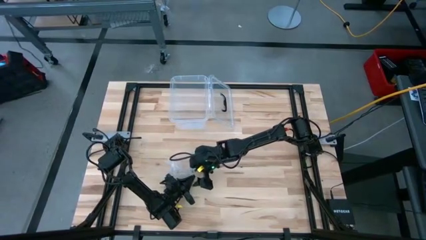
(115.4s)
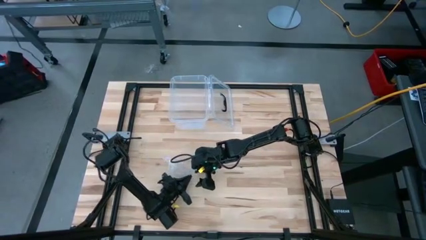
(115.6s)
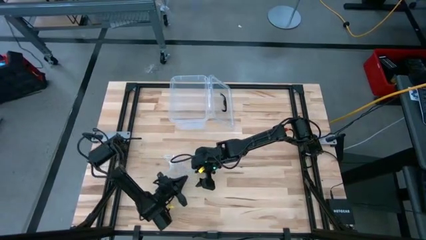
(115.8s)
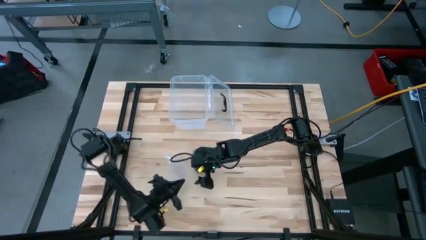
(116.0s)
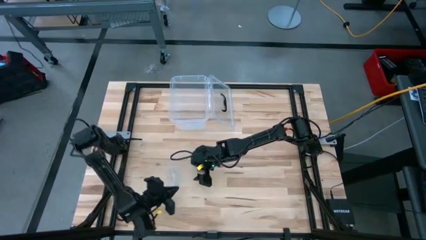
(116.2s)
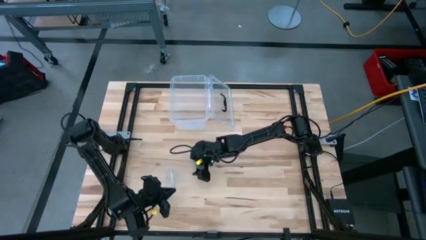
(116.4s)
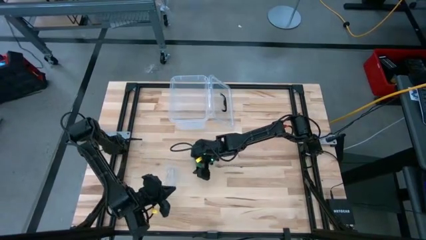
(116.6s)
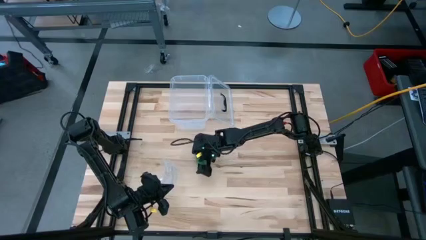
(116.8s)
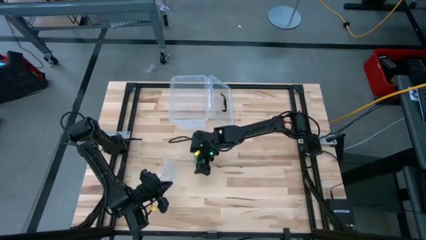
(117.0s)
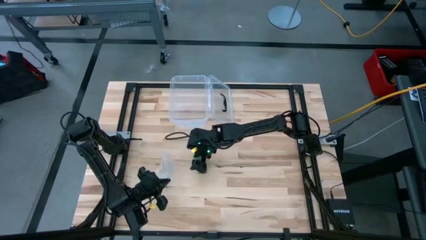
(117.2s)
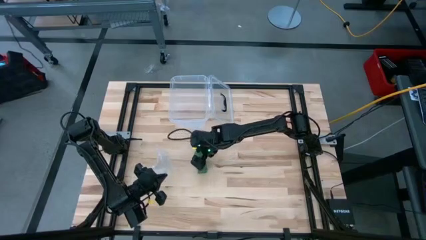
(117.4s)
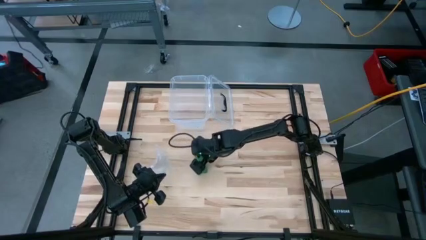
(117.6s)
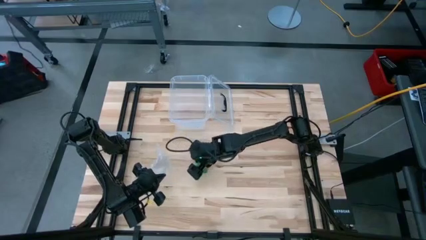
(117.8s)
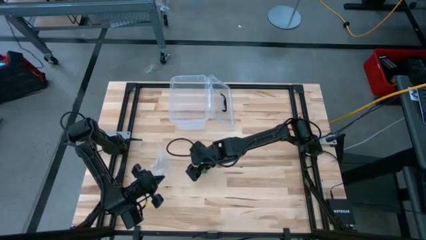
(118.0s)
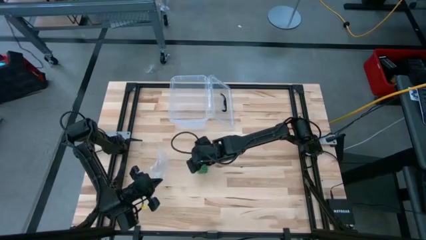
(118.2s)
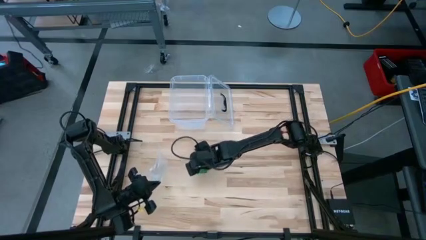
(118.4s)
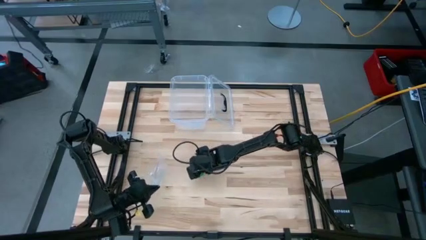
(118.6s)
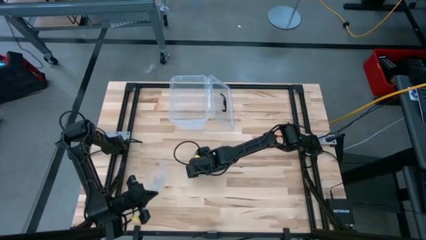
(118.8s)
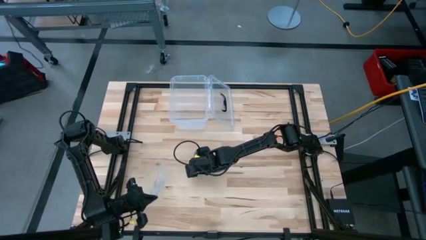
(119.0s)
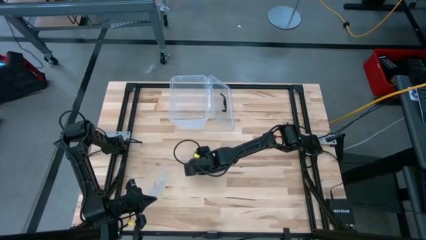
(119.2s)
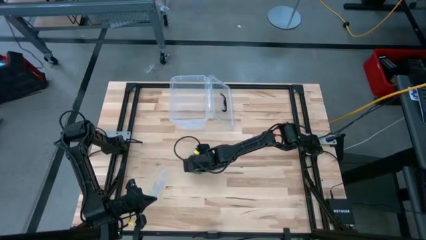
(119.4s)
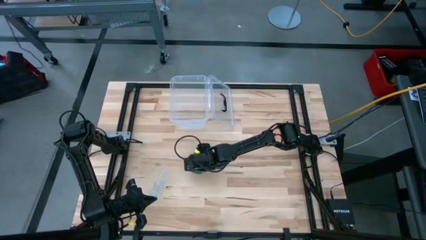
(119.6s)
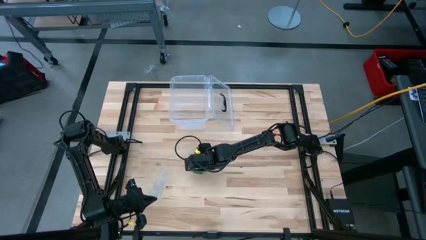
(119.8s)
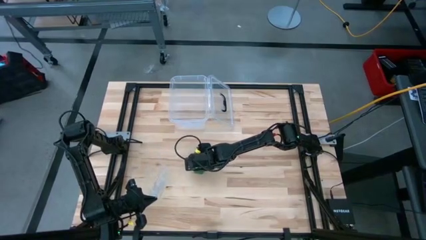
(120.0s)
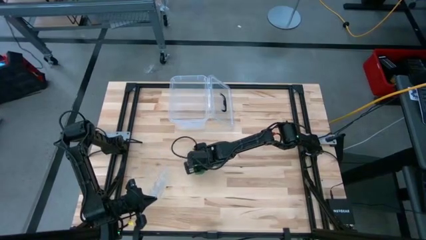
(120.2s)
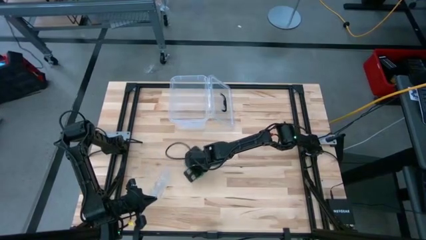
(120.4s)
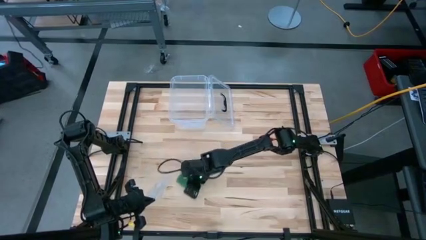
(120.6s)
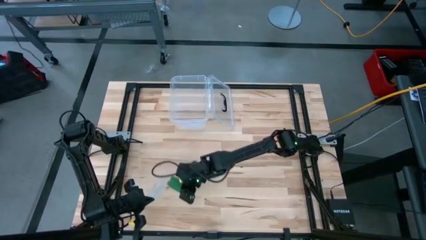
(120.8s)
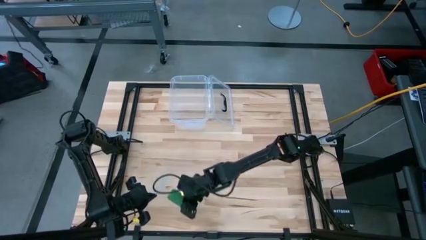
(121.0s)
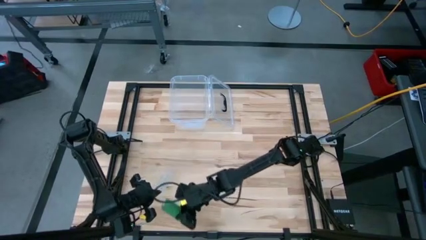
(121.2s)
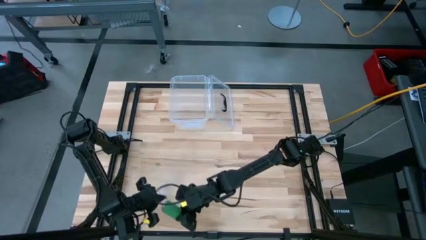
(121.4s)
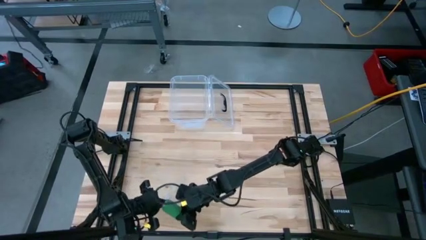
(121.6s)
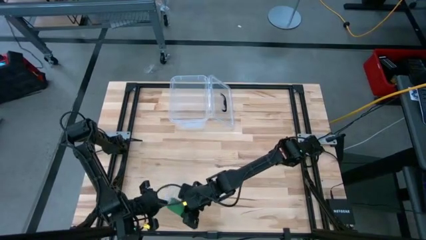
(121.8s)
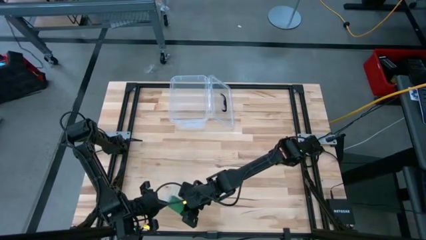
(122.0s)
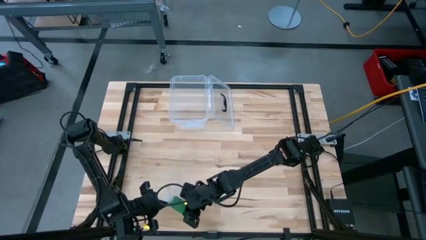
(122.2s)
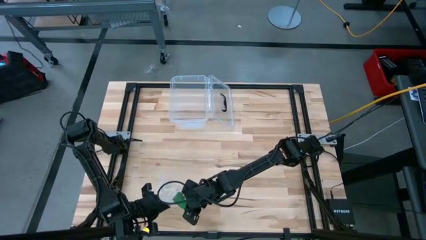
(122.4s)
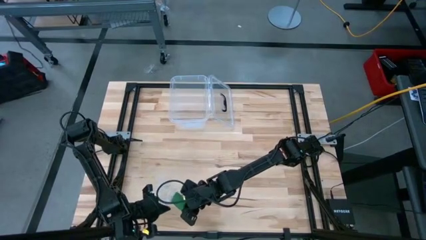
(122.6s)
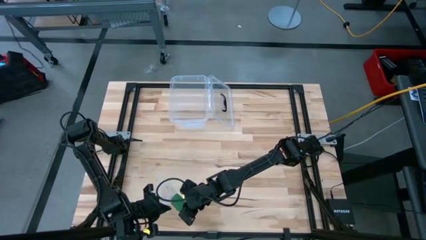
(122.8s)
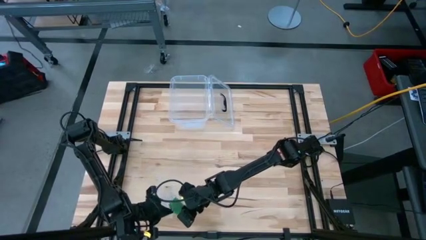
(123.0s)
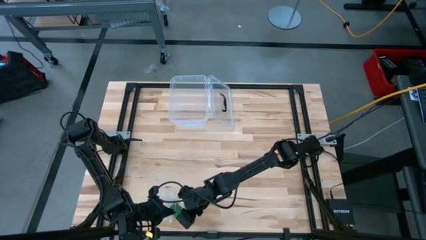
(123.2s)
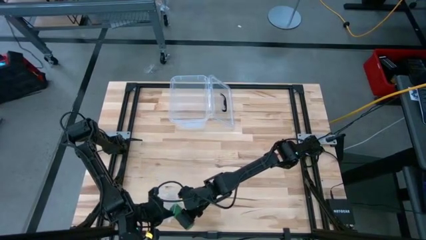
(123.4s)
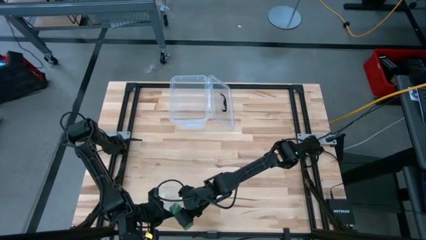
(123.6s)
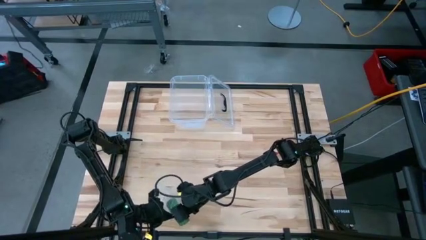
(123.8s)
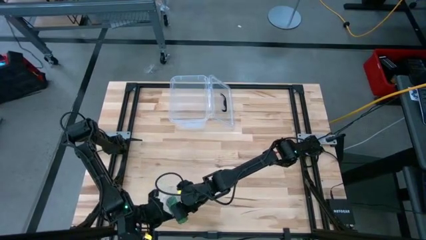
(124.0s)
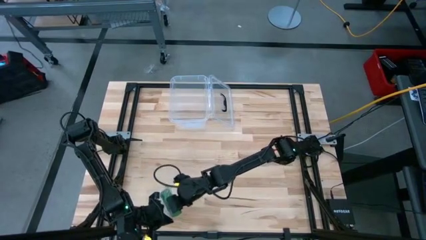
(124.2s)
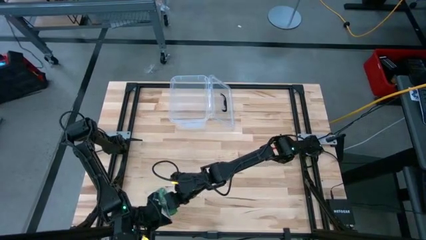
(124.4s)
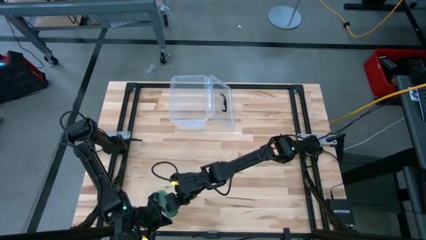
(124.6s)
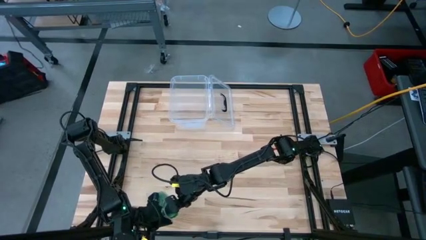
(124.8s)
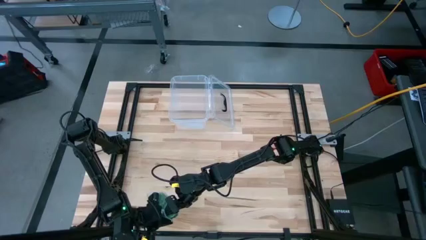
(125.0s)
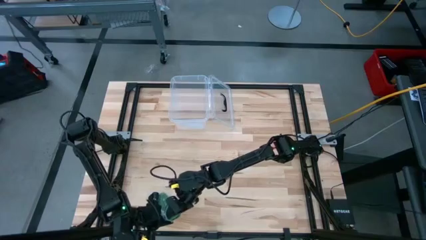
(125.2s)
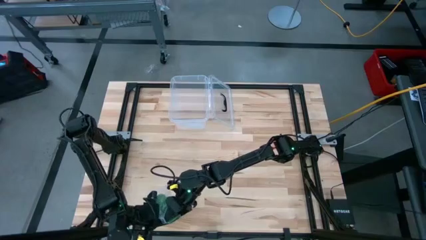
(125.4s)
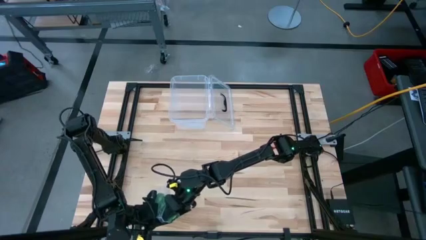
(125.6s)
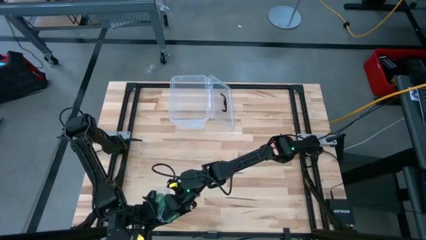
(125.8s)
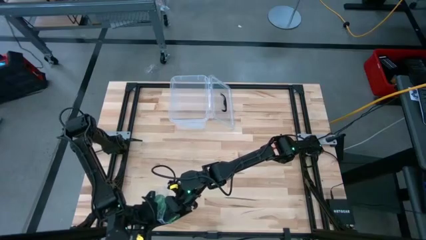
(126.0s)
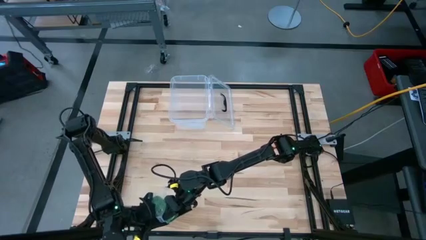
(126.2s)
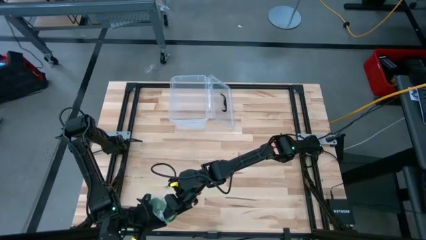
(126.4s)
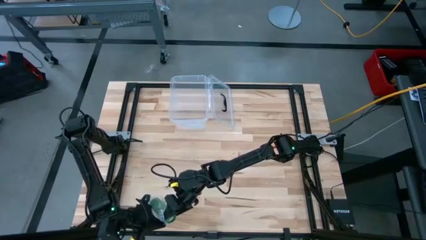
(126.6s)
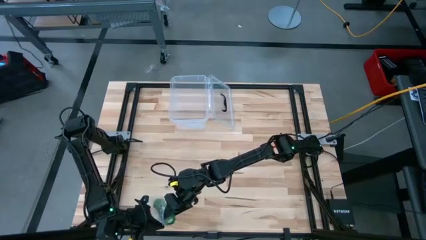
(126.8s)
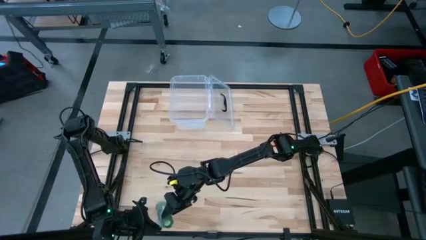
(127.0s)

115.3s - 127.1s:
Task: Roll bandage
Put the green bandage into the transparent zip bag

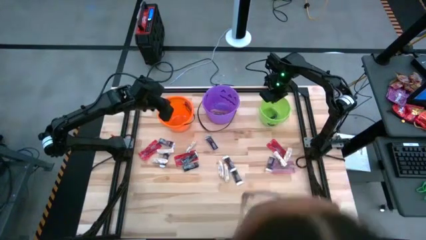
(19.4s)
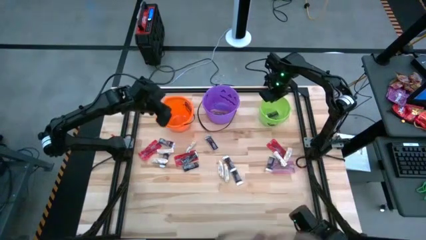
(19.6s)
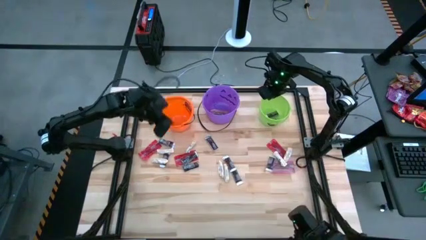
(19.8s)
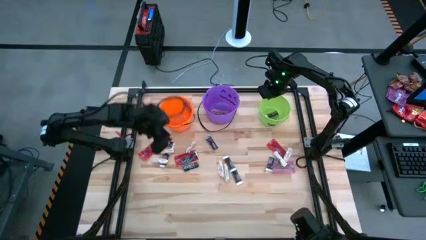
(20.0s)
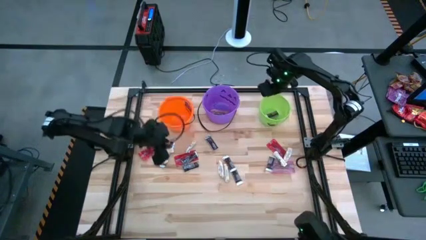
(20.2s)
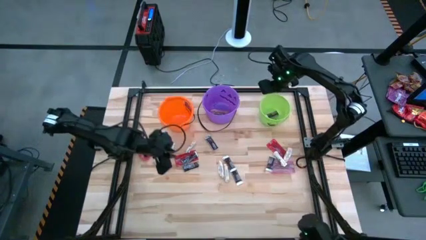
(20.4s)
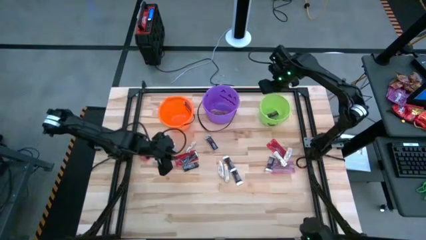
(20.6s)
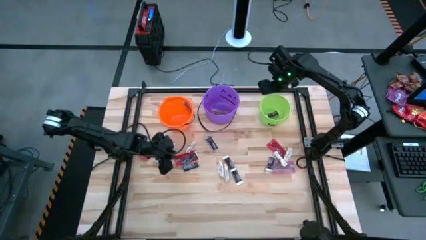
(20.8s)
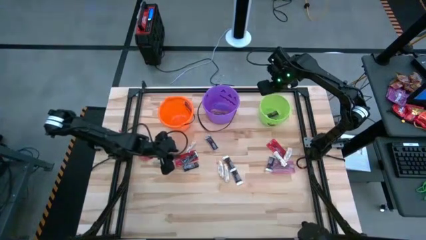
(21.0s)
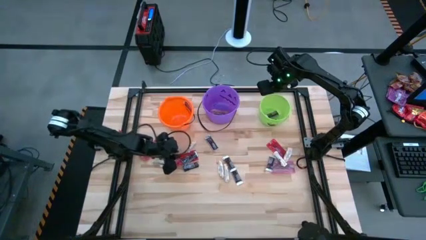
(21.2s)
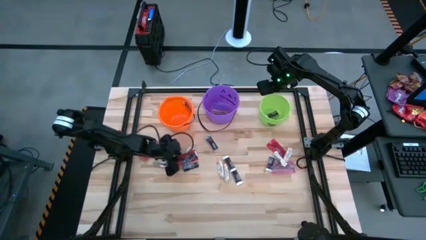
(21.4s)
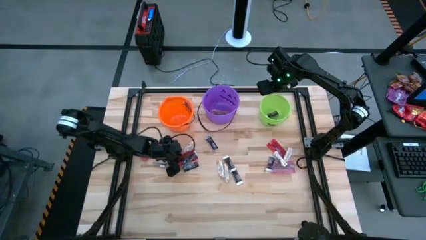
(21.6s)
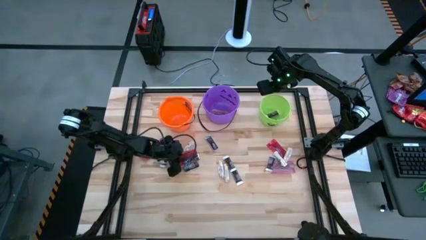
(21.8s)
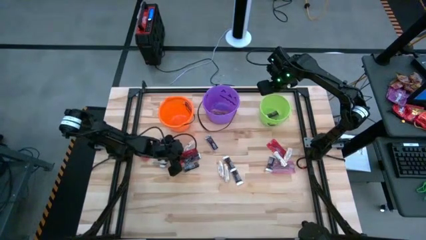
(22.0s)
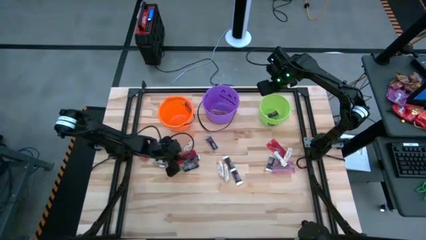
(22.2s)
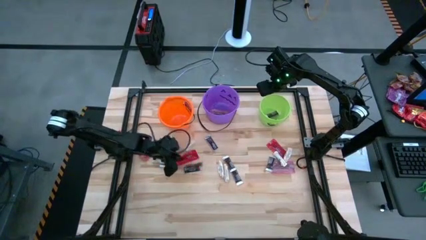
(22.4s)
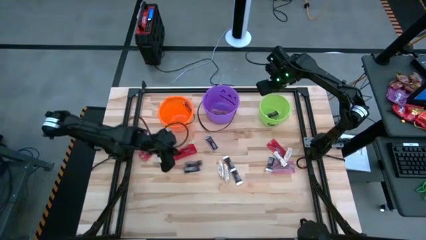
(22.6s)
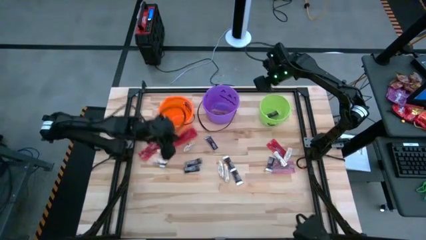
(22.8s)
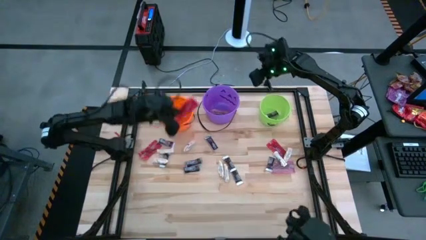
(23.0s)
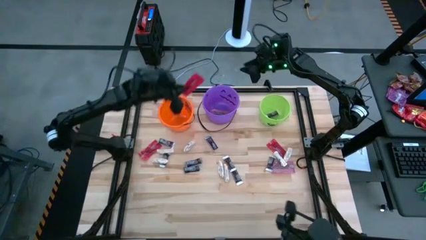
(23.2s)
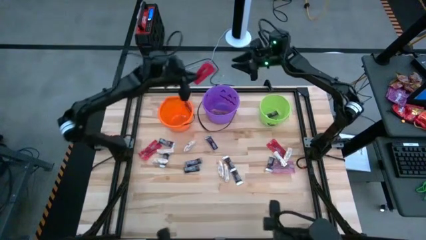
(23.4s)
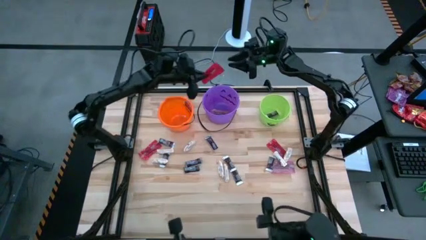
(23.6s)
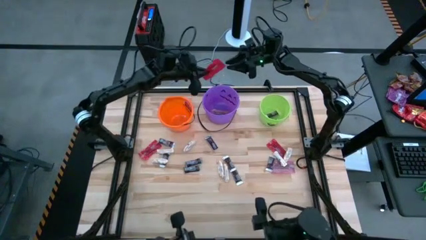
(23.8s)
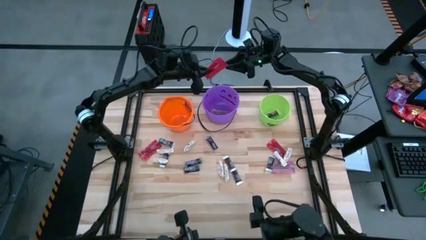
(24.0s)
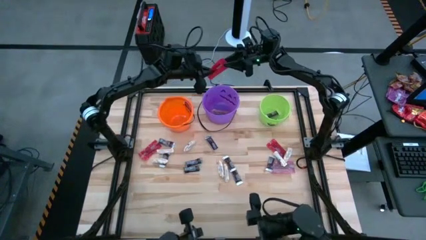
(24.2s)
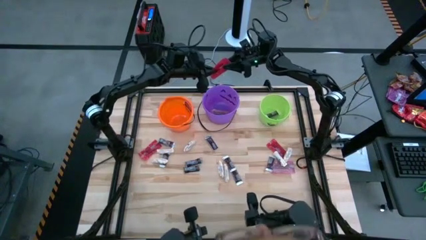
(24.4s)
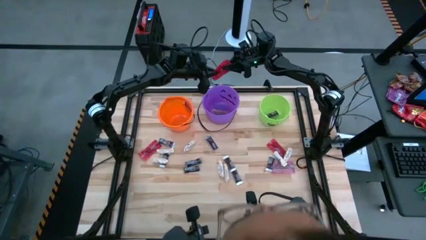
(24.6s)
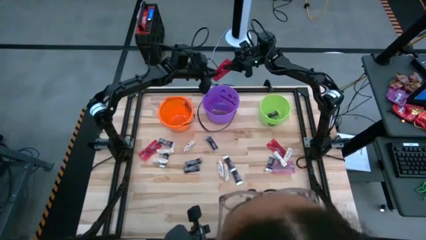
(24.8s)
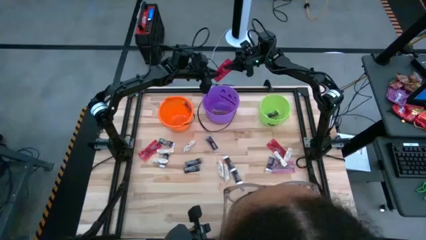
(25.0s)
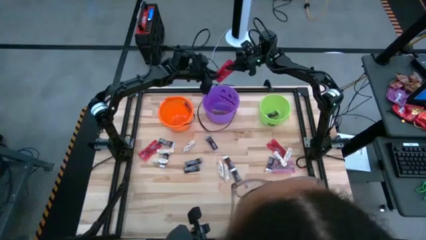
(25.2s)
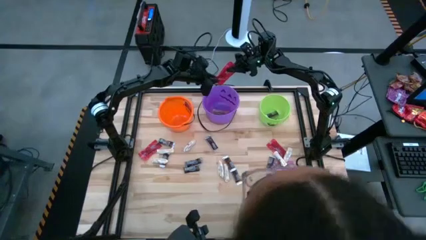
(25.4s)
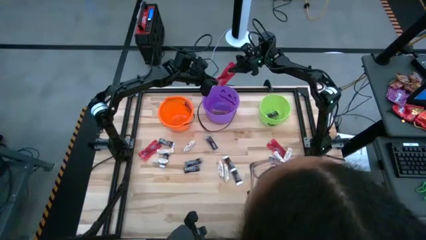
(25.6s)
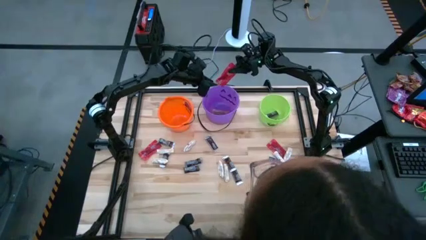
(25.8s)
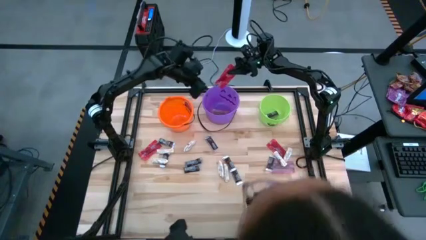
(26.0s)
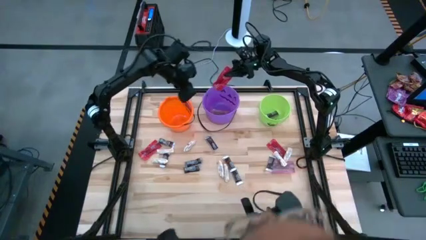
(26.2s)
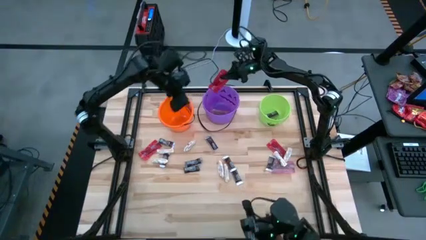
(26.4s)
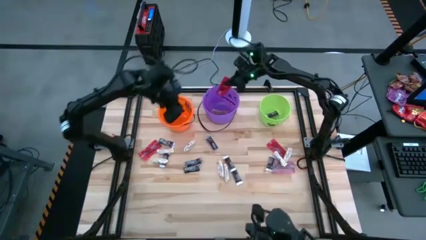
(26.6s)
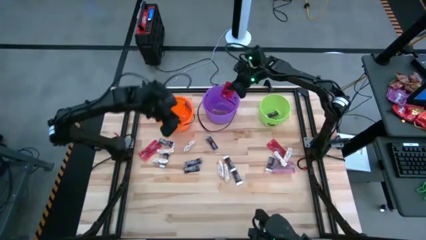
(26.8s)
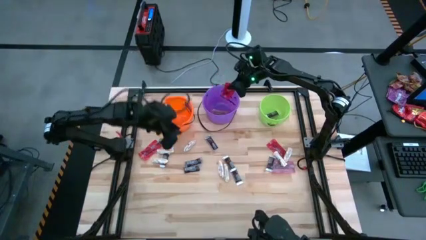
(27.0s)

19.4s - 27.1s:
Task: Sort candy by brand, put in halloween buckets
Put the red candy pack into the purple bucket
